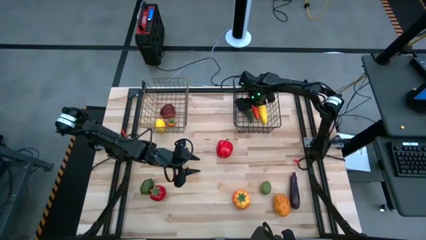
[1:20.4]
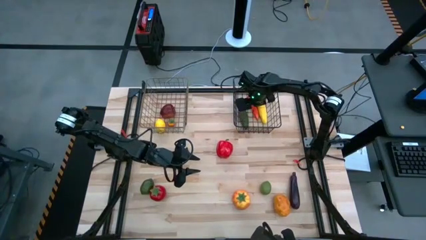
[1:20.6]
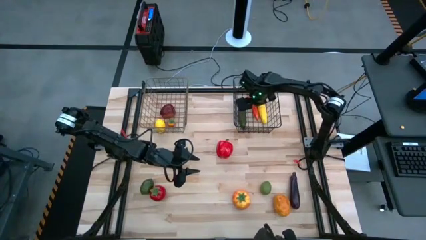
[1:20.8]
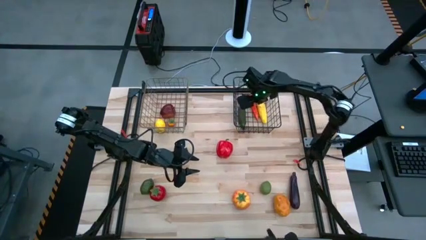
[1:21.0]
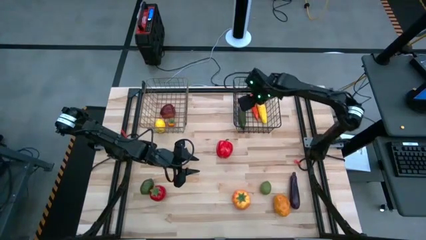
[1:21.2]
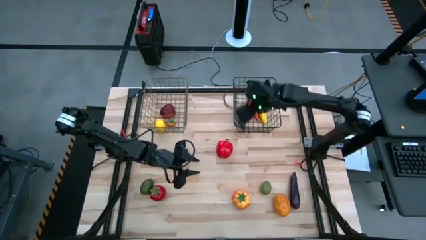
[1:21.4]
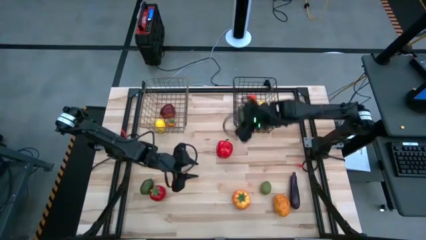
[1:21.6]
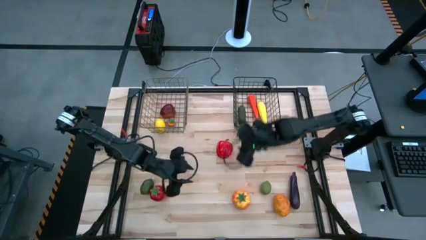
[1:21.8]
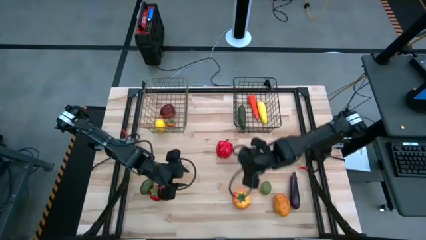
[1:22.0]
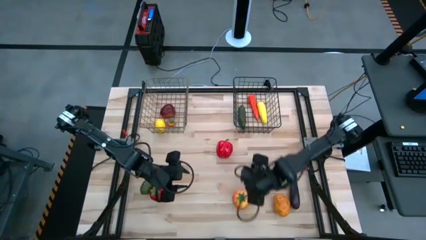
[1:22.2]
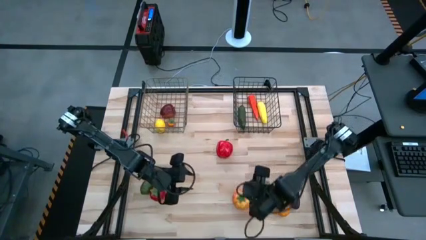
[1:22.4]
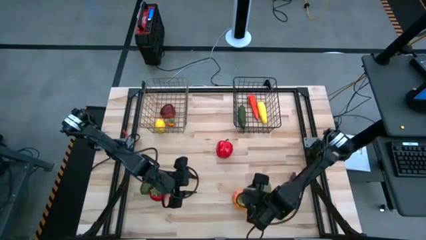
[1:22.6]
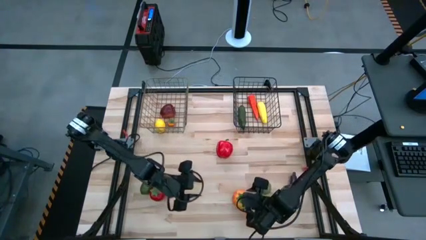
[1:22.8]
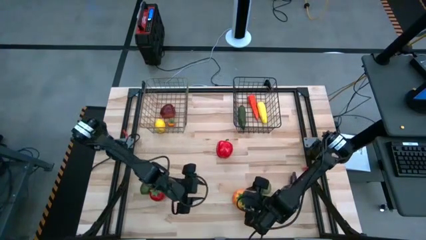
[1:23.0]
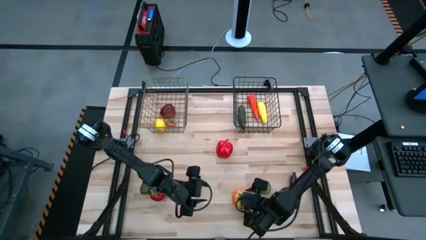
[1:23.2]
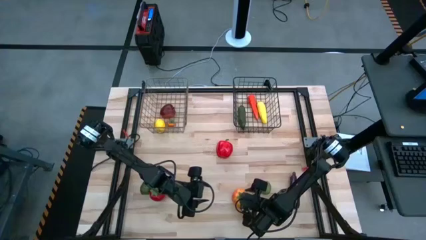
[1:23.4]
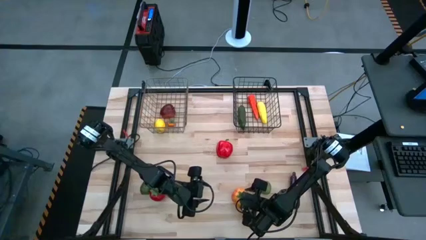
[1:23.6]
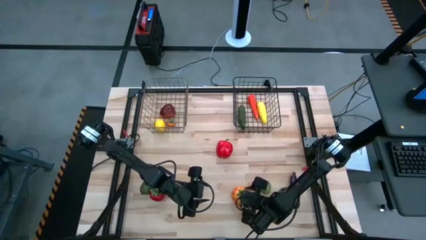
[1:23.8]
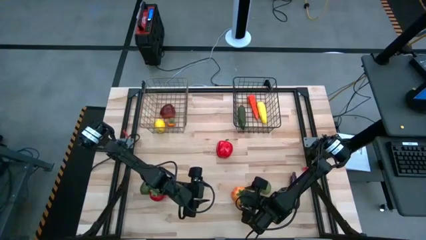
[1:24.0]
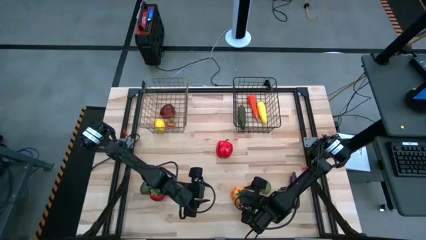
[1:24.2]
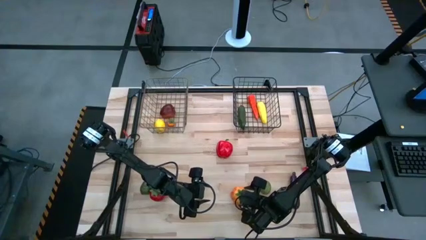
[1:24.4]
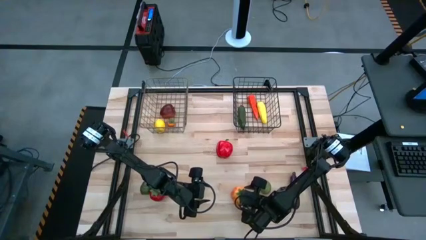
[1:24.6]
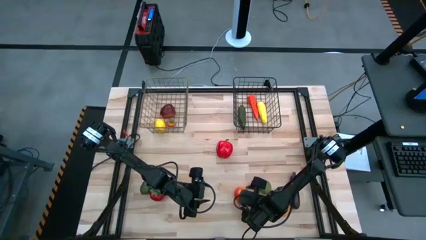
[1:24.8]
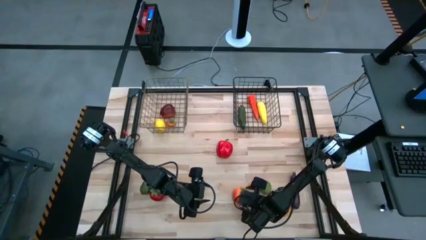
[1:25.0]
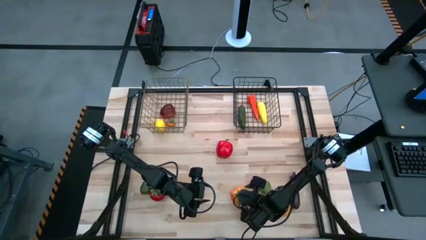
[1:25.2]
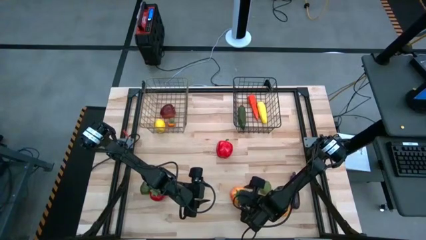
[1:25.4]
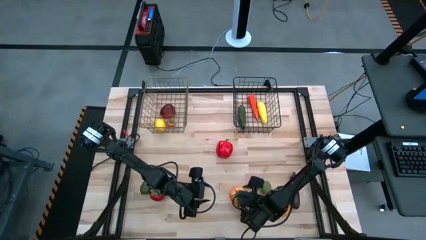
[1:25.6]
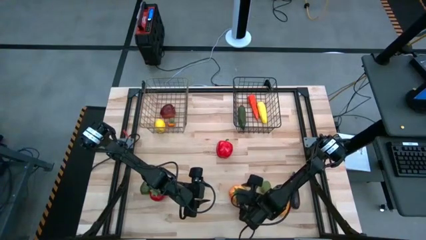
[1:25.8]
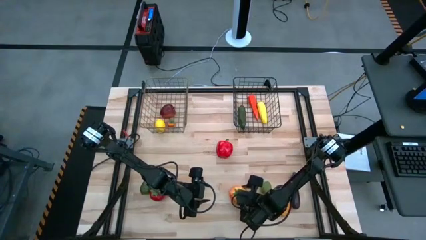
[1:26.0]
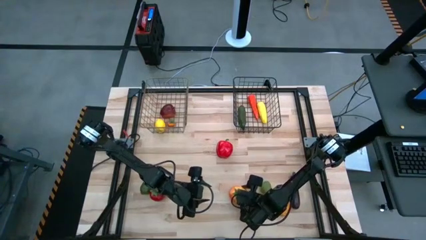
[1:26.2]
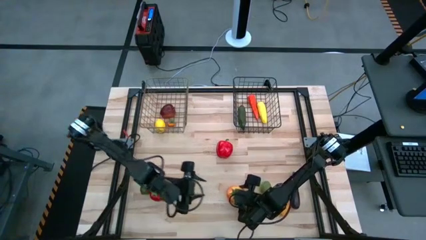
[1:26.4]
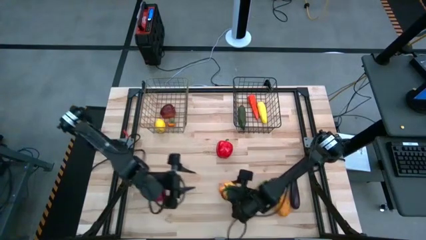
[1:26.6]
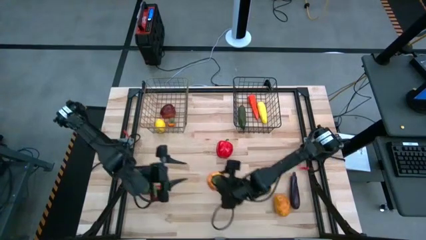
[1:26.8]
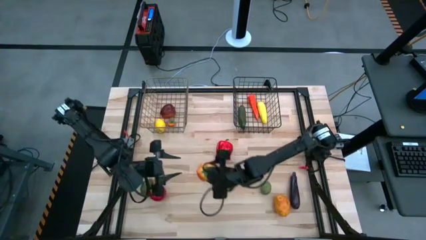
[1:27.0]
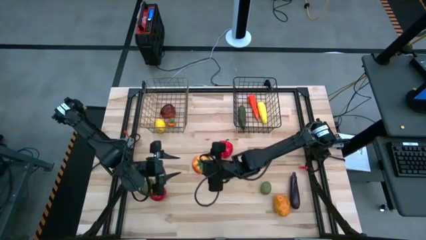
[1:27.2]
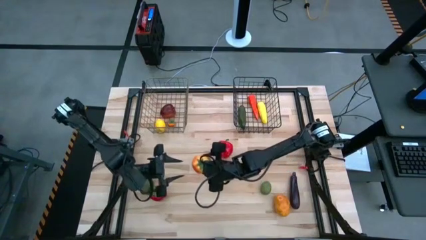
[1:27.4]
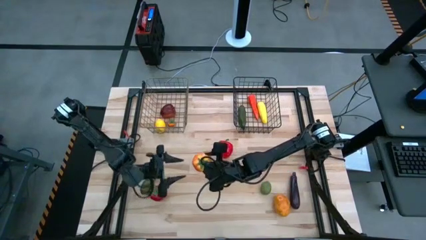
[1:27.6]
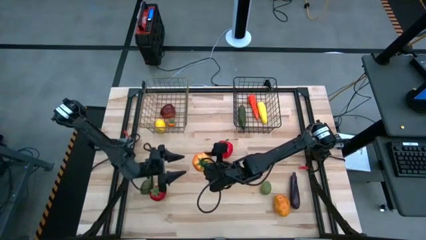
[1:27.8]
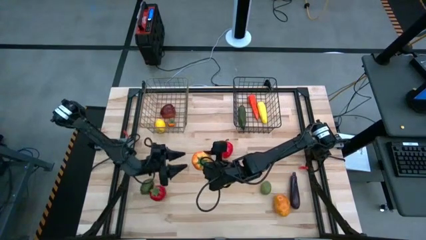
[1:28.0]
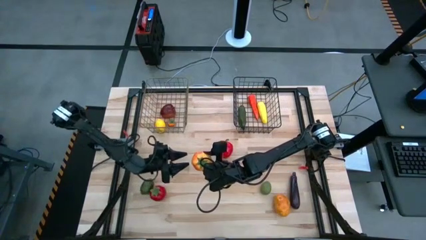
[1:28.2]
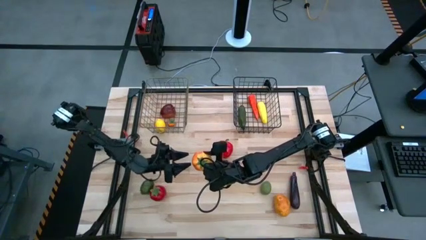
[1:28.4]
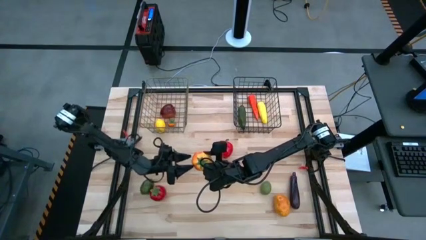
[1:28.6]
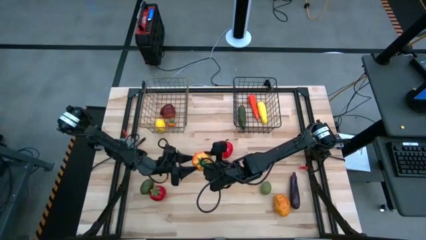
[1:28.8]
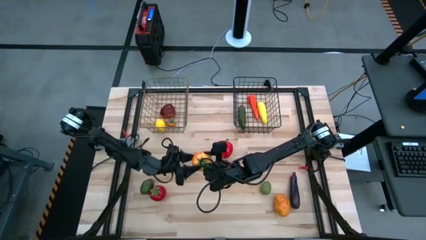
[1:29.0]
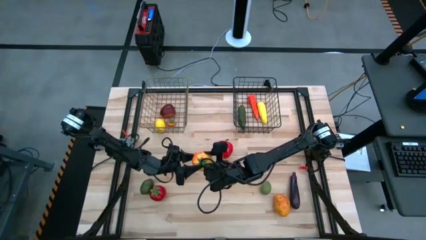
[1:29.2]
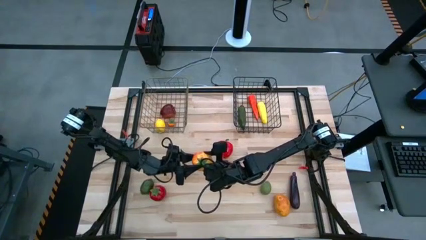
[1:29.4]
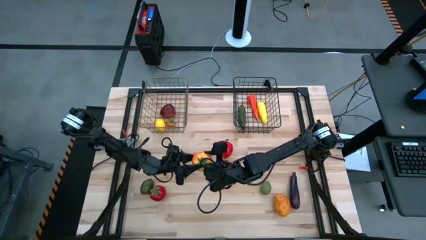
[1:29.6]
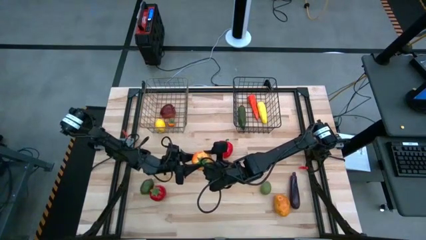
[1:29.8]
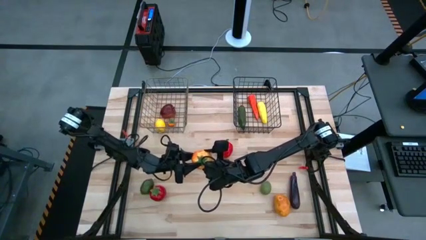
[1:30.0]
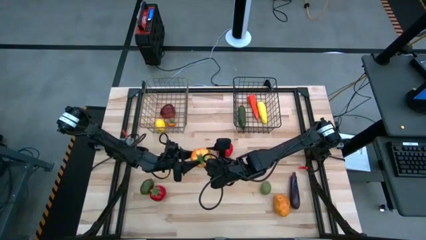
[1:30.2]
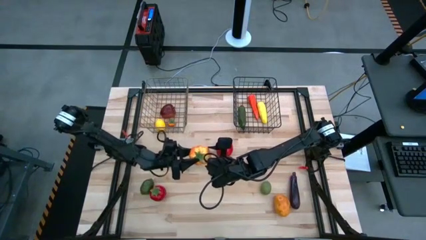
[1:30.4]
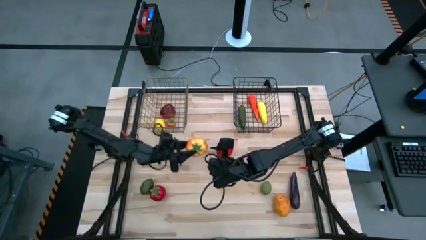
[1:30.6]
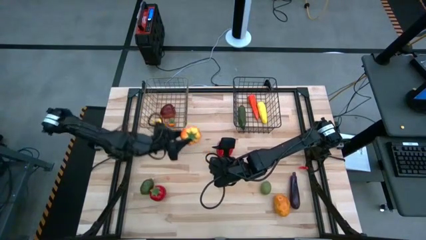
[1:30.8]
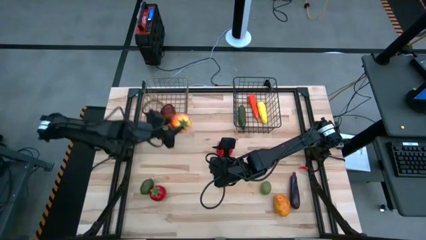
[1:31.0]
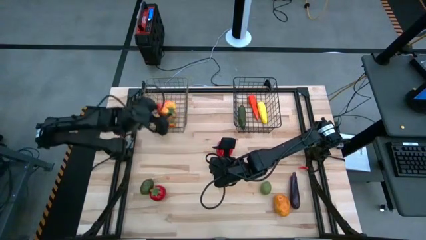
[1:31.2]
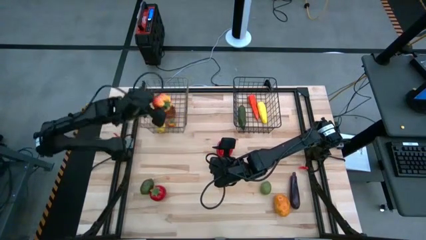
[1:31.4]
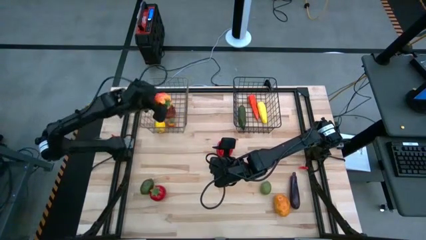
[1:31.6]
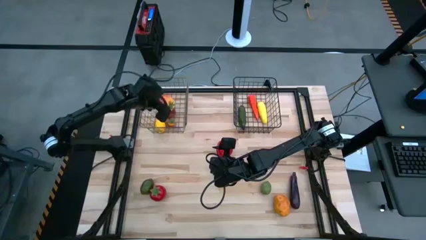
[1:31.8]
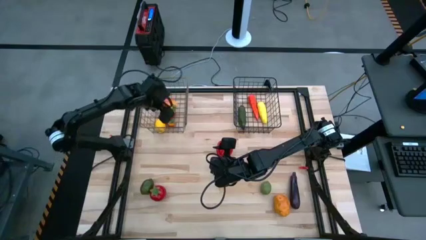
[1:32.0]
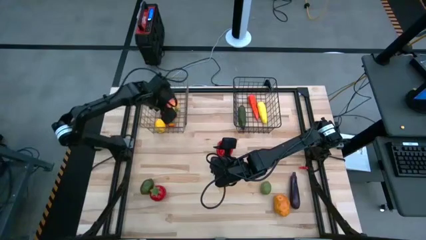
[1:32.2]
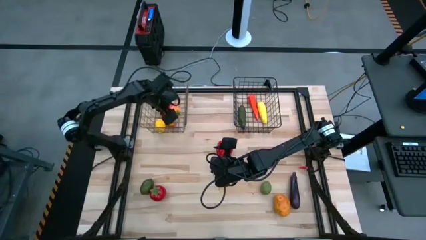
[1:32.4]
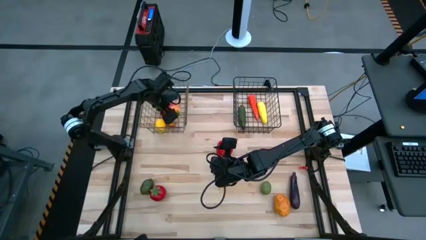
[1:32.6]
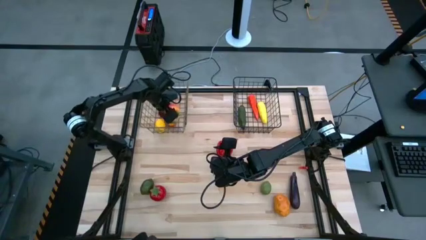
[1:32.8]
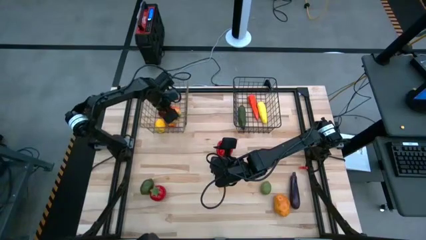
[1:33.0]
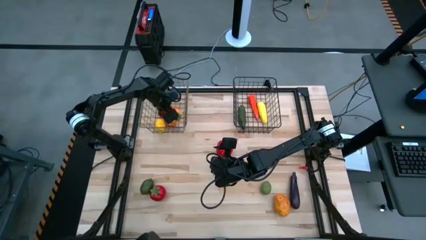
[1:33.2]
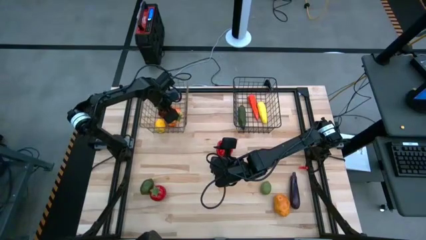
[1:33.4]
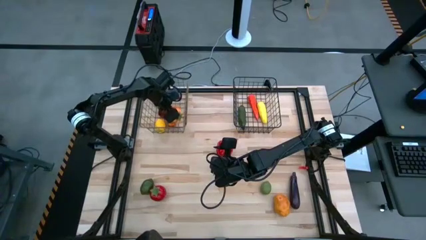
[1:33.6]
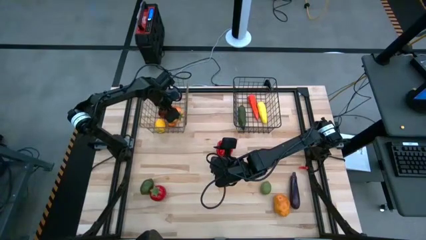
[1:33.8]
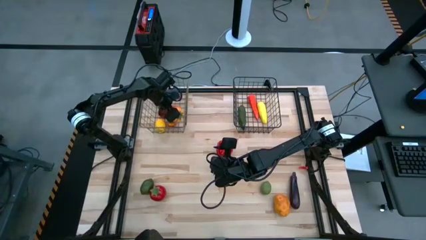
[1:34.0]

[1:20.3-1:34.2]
Task: Sort produce into baskets
Put the orange tomato into the left yellow wire basket

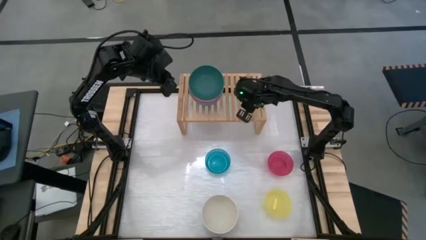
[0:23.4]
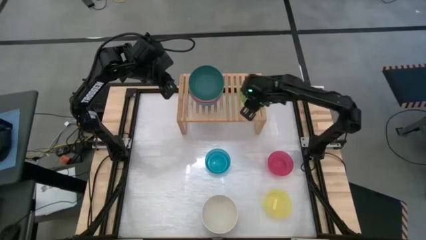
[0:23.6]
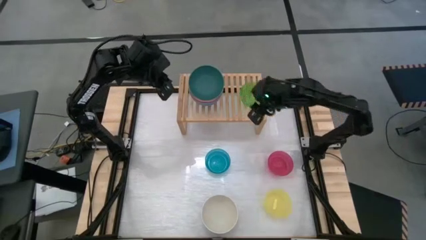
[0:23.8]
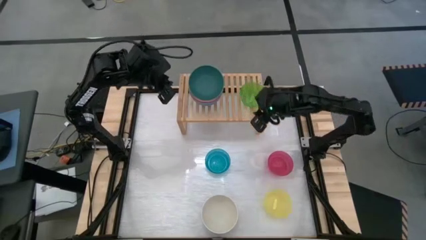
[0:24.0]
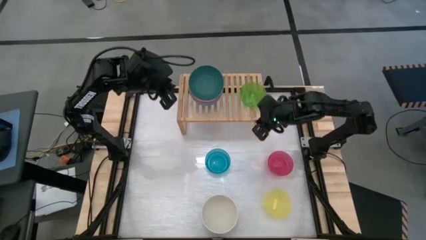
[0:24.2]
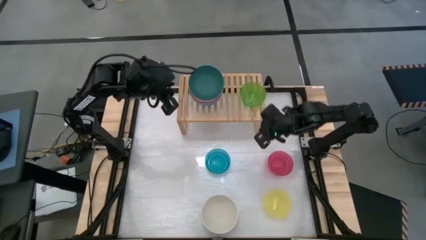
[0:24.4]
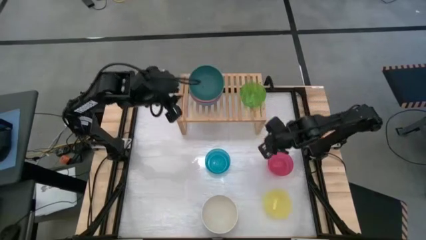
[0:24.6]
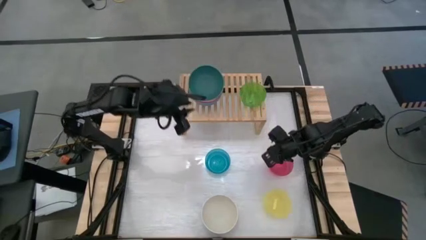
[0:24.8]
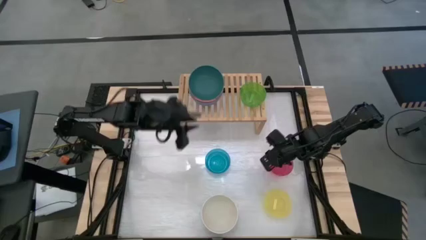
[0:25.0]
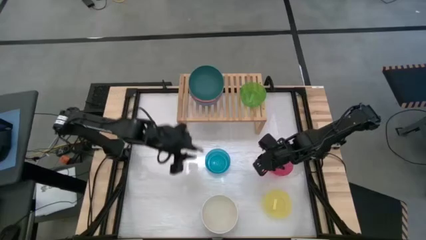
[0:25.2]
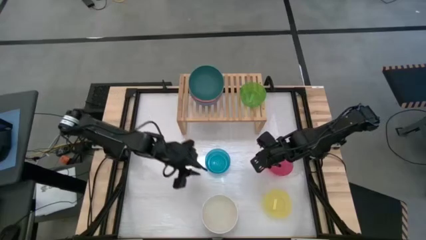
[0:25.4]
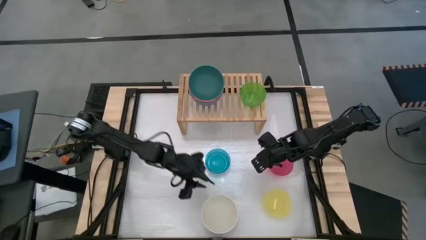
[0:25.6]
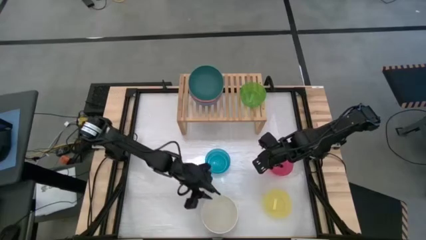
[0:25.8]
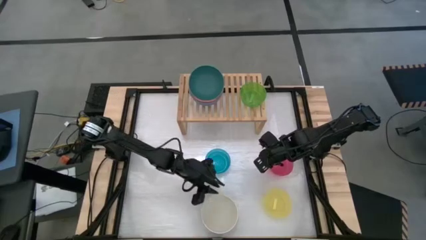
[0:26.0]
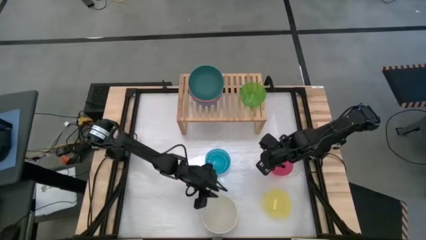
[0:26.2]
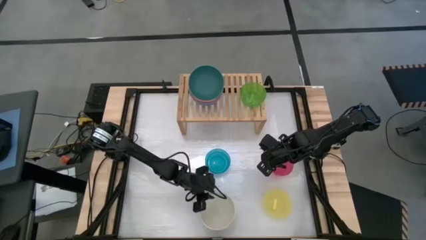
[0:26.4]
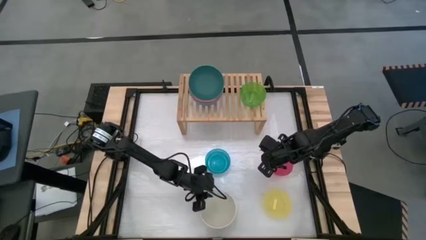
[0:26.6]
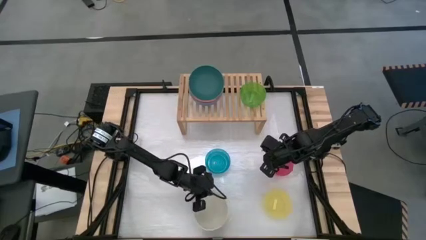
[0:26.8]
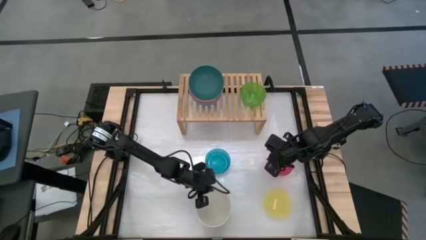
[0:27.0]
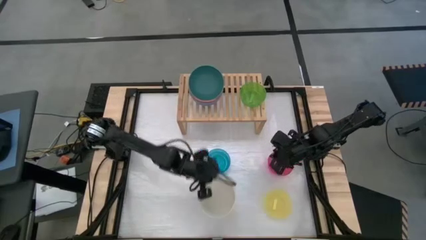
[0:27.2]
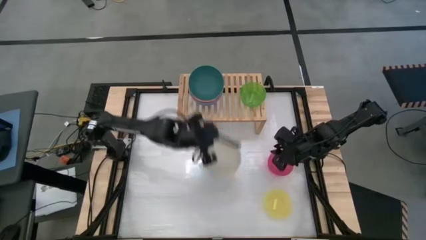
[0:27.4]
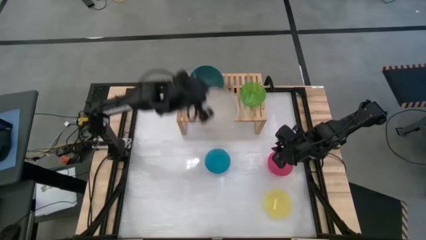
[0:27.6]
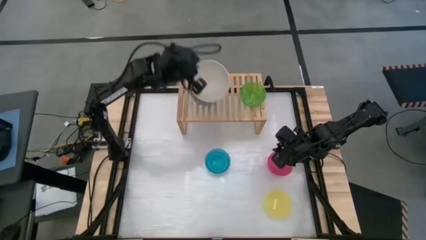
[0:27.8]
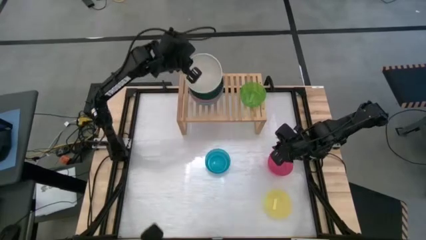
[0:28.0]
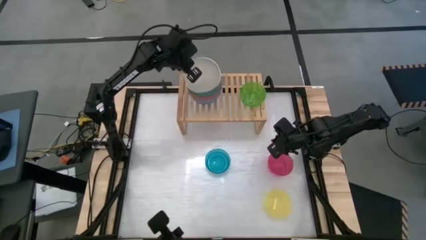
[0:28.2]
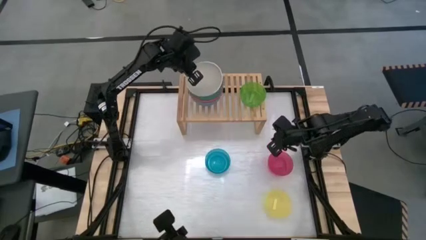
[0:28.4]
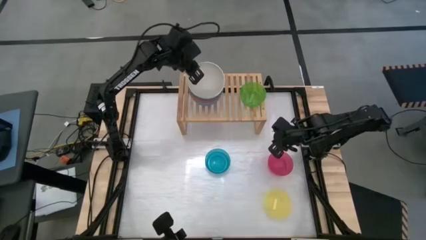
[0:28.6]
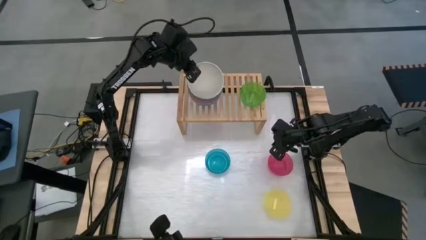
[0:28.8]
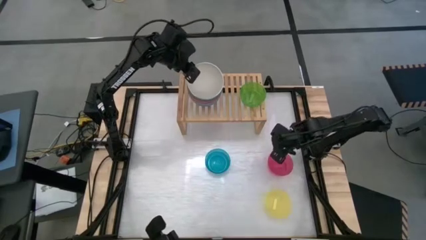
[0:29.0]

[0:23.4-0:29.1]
Task: Place and stack bowls onto a shelf
Stack the white bowl on top of the dark green bowl on the shelf
